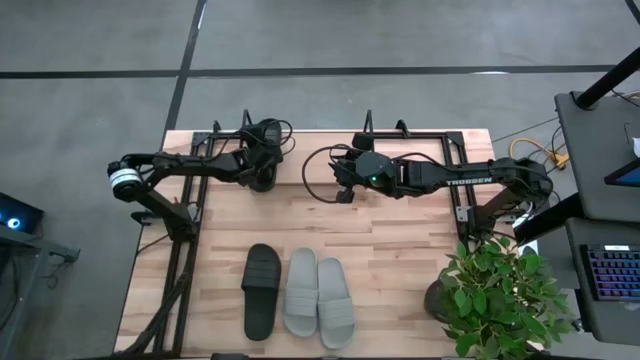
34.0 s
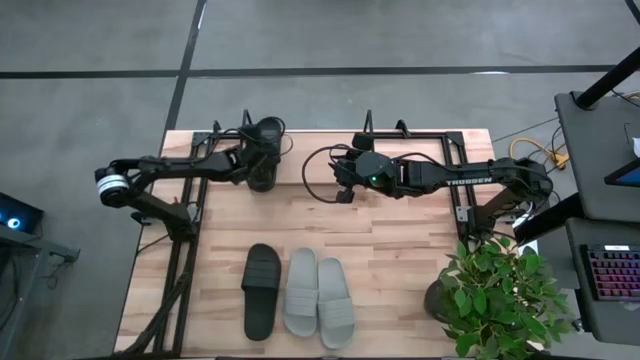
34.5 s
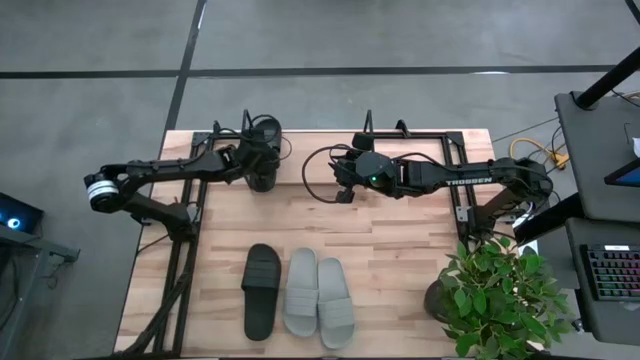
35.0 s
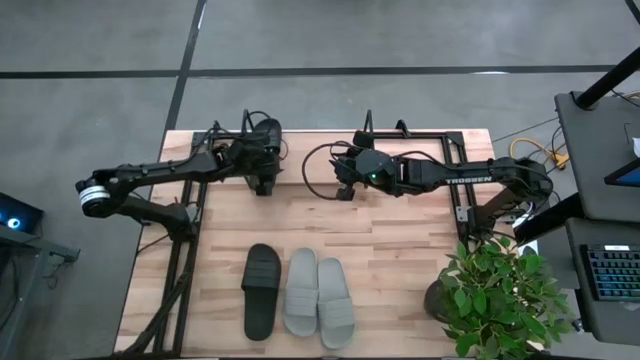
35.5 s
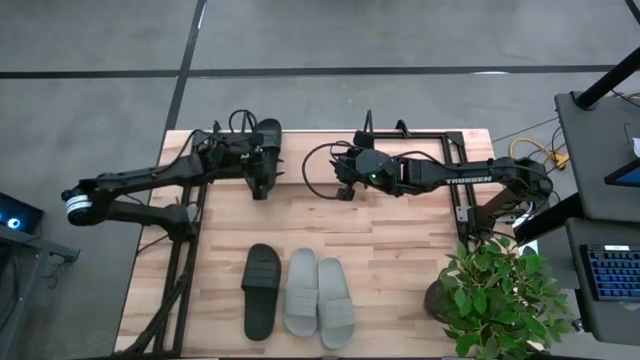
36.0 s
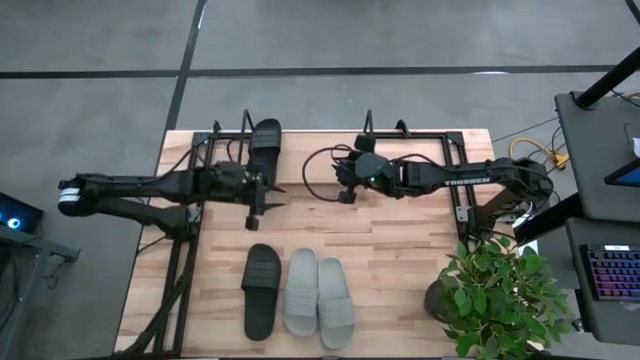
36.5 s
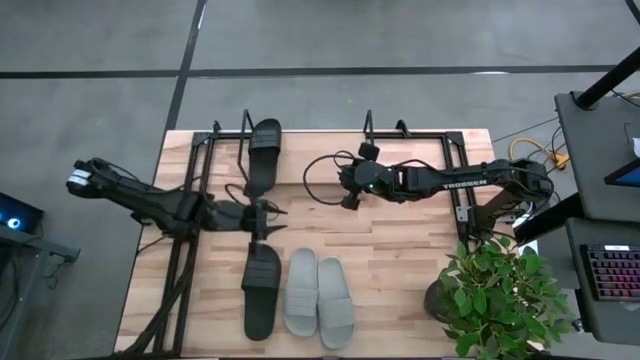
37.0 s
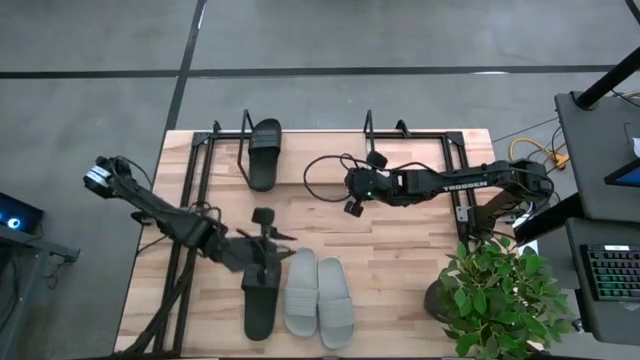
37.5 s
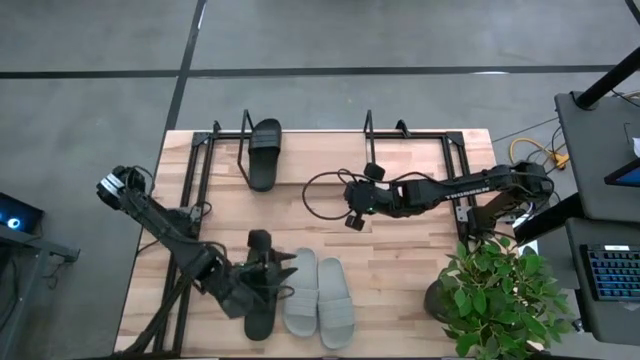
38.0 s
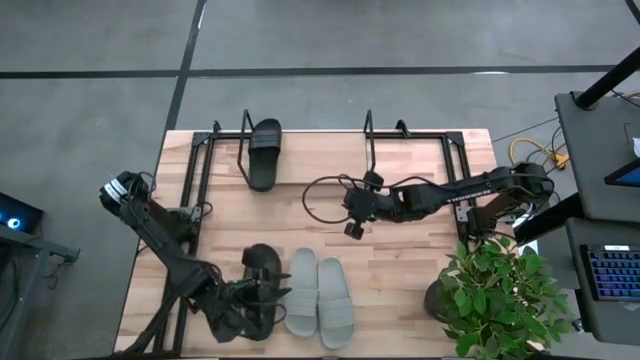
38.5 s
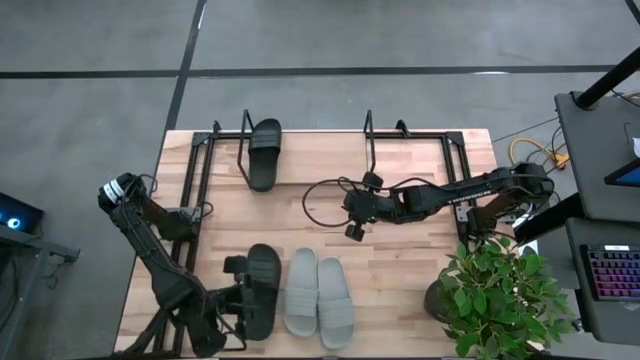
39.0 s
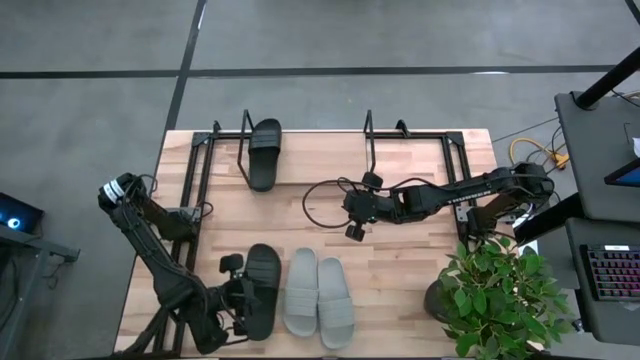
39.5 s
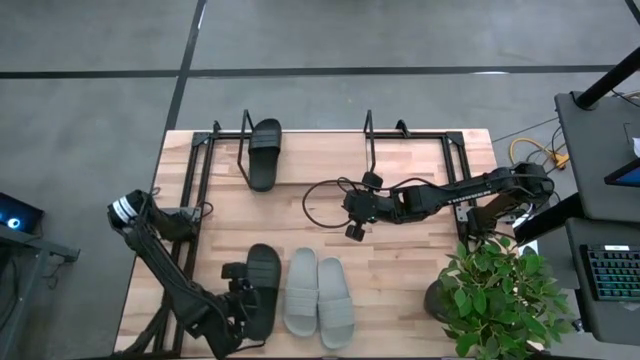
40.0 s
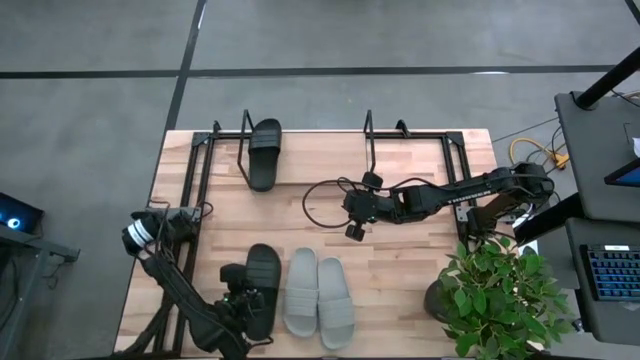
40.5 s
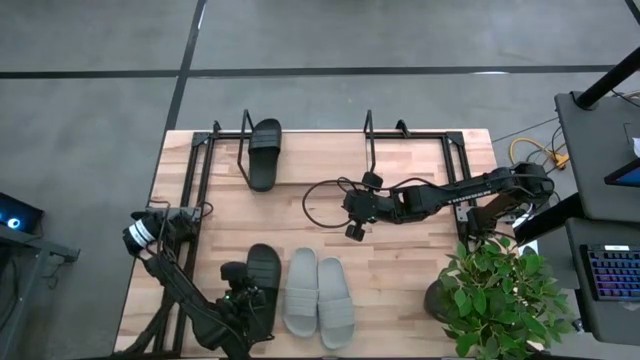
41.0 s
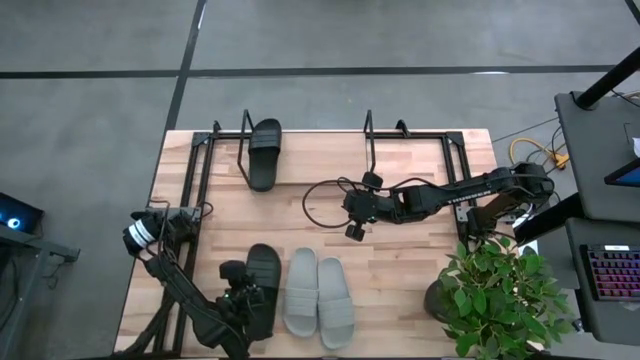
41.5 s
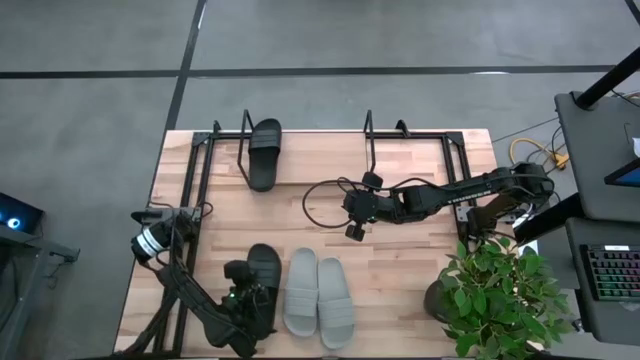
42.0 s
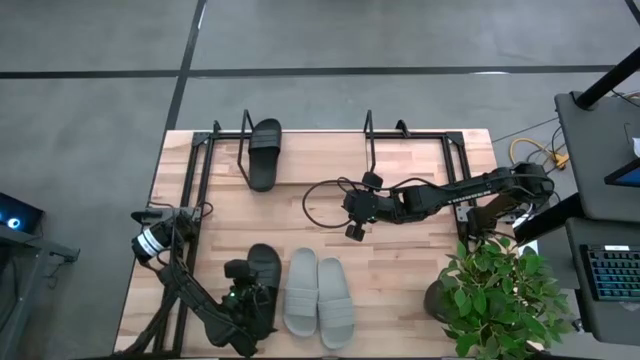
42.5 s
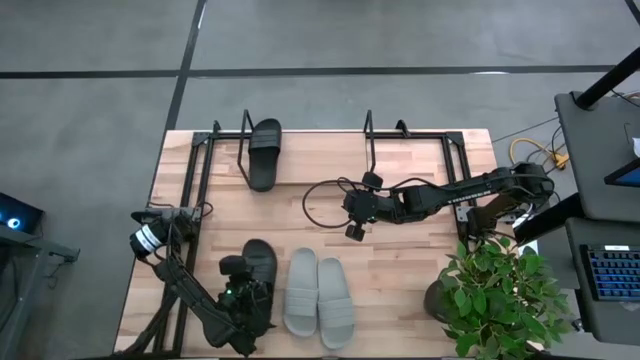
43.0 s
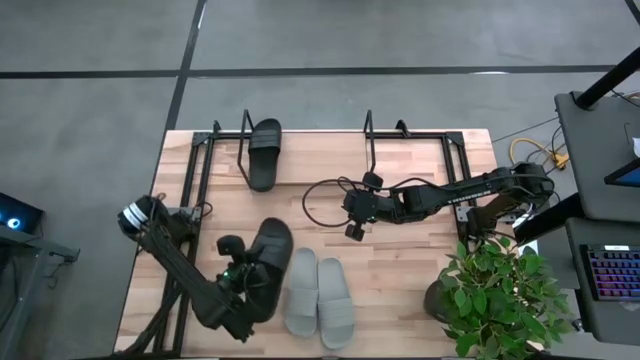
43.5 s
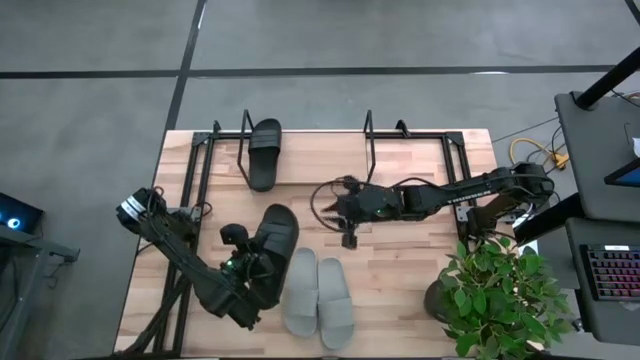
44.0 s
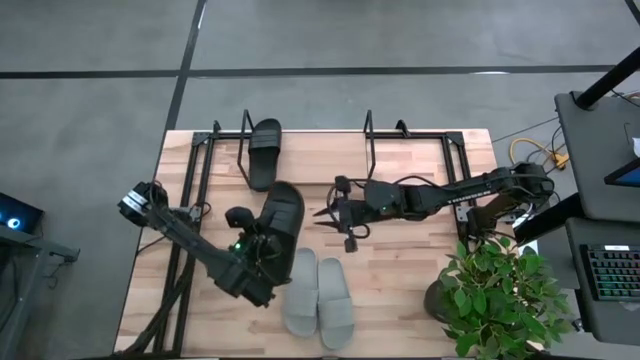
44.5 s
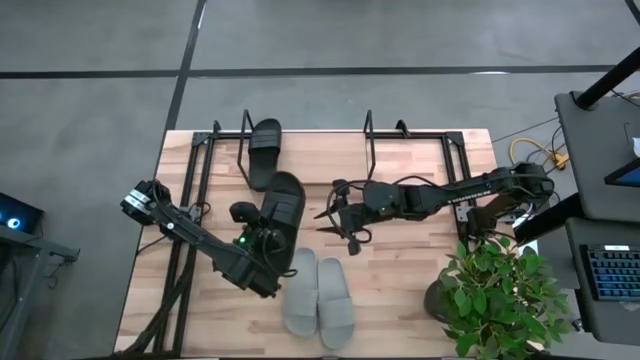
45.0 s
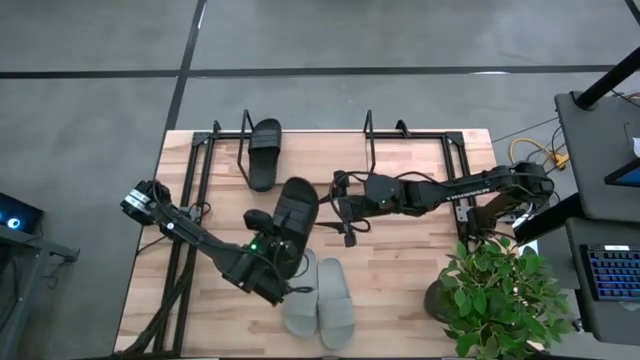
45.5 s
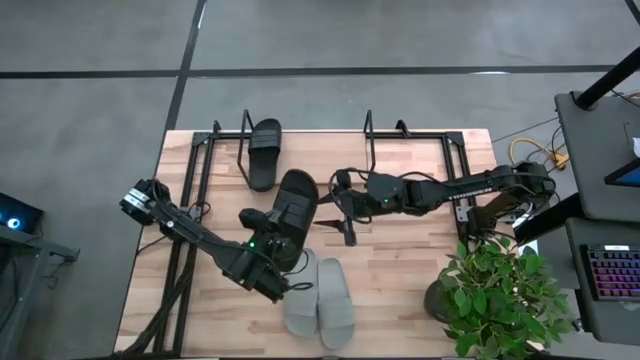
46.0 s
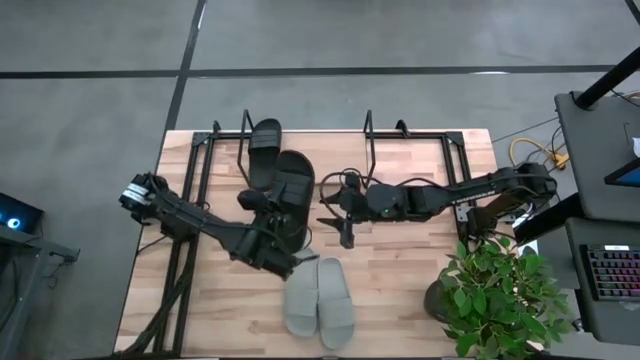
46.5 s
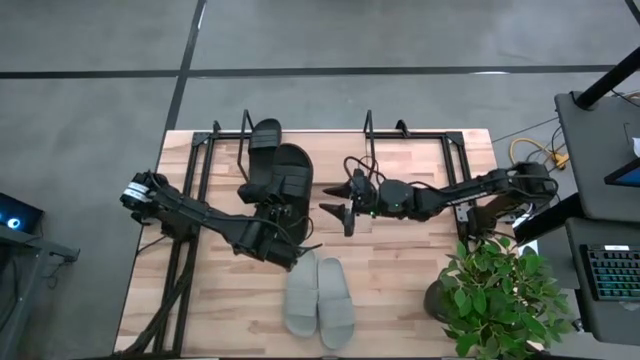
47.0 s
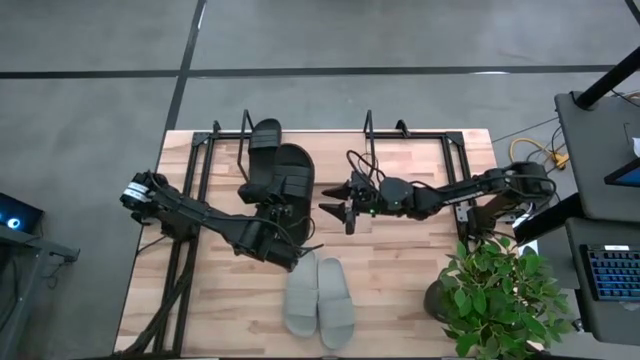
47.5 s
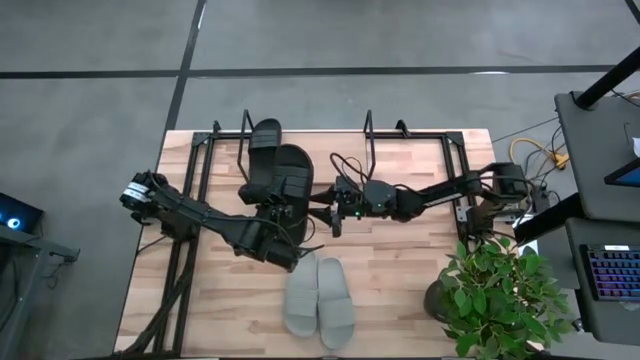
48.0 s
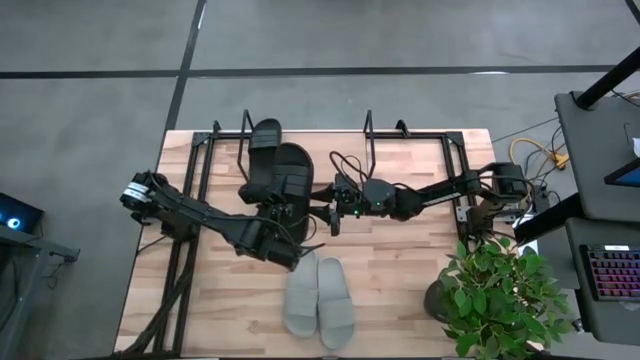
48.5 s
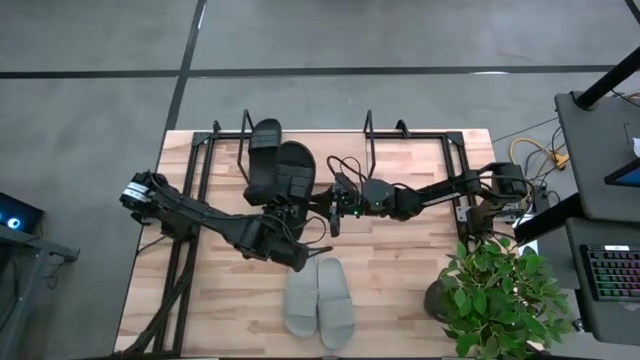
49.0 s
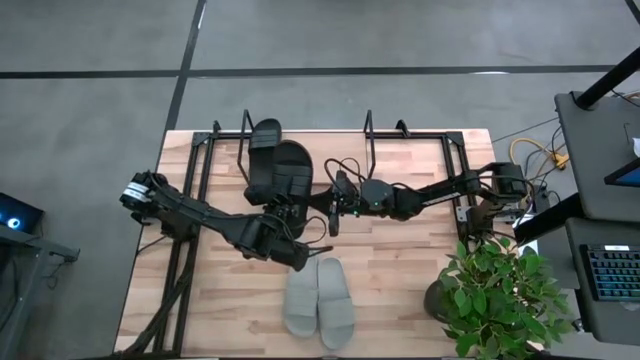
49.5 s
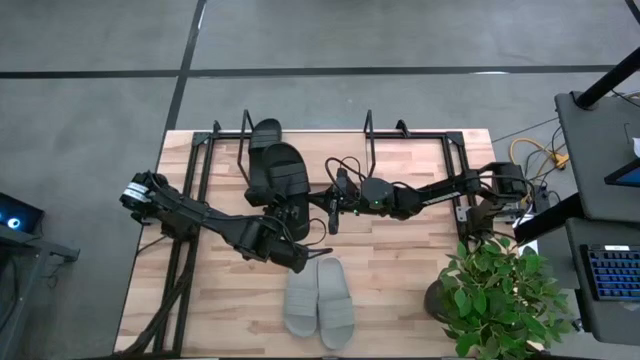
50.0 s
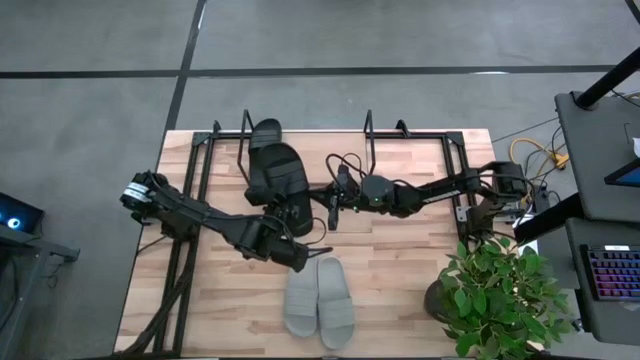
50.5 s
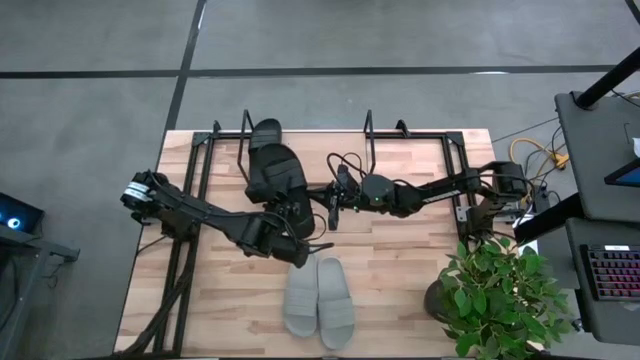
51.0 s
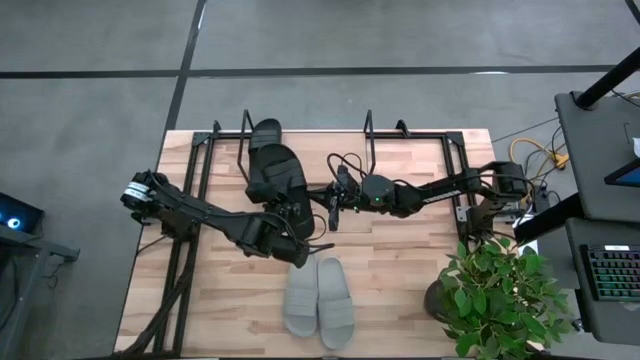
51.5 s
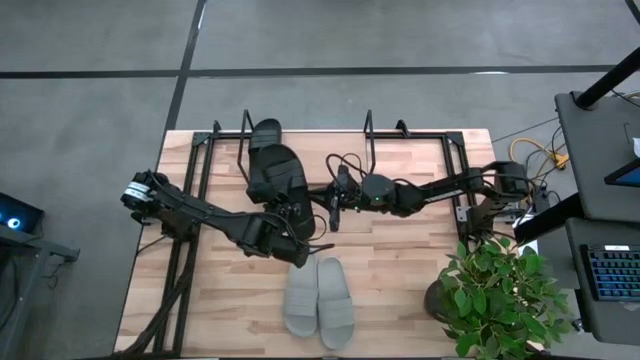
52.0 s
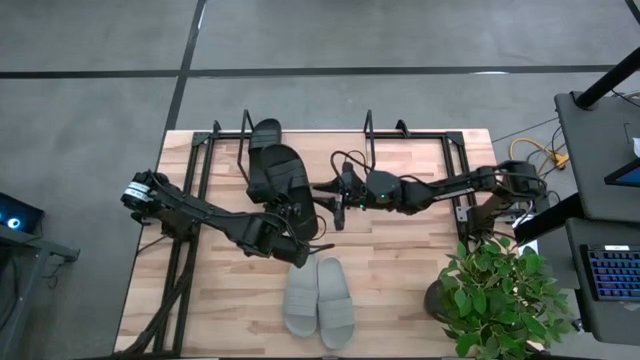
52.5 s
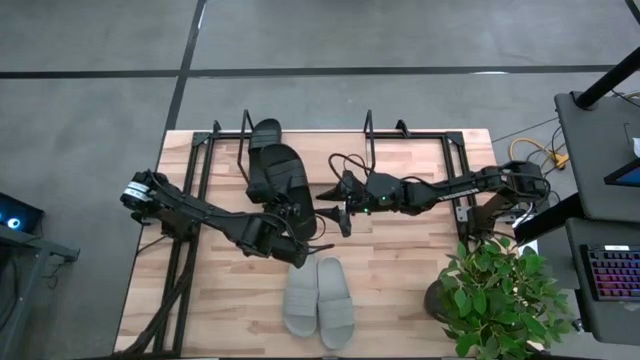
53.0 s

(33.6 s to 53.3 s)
Task: Pick and place slides into the shelf
Put the black slide on the shelf

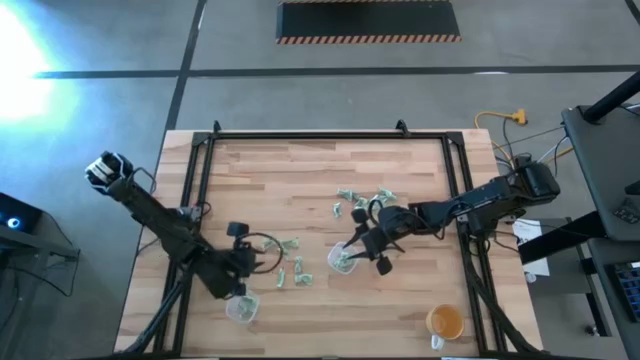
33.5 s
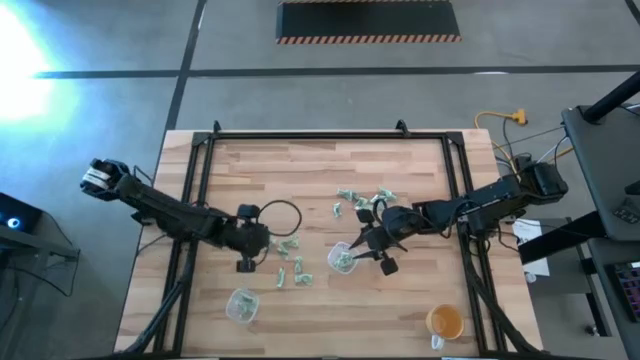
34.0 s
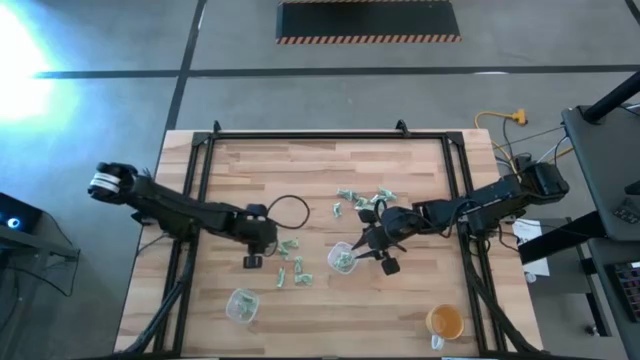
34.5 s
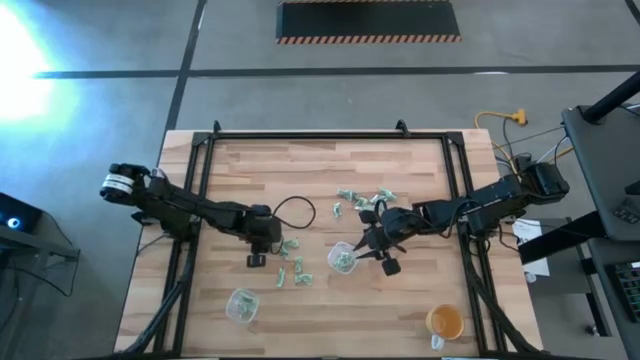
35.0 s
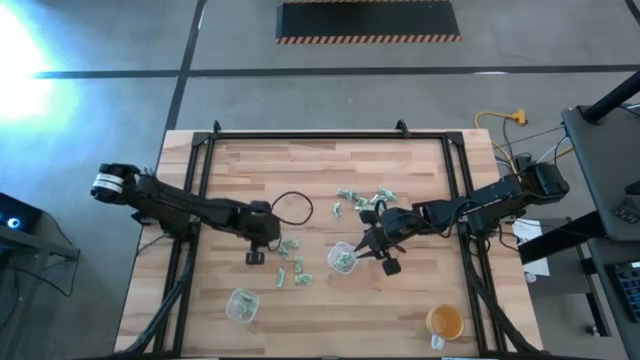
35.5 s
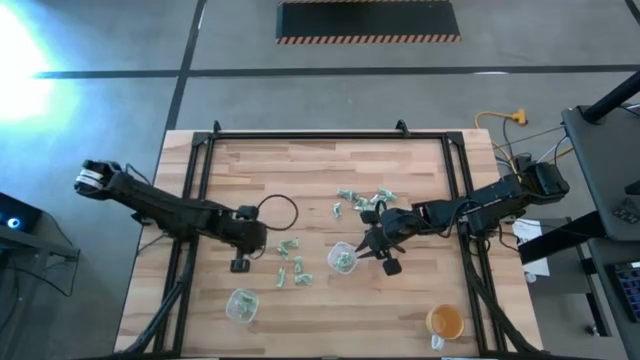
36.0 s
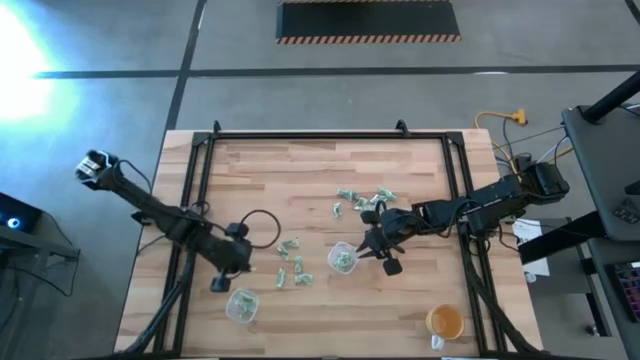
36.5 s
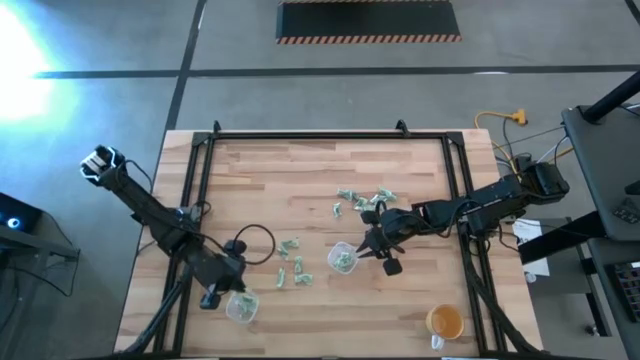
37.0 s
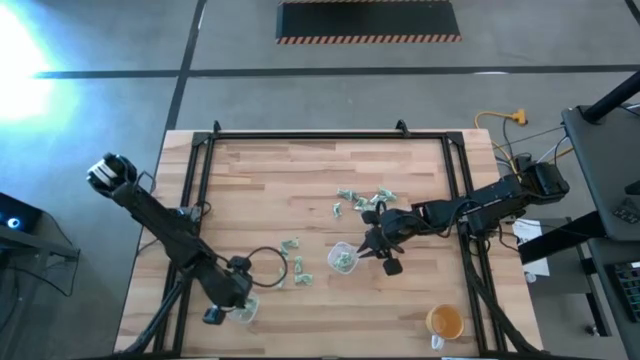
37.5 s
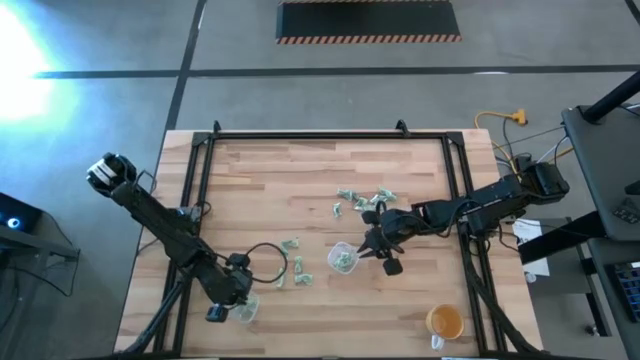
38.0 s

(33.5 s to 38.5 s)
Task: Pick and place items into bin
Put the light green packet into the bottom transparent bin
